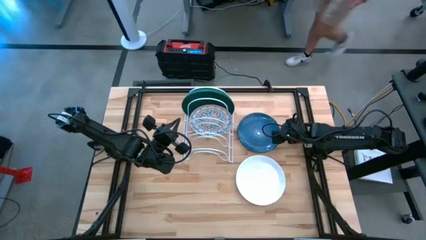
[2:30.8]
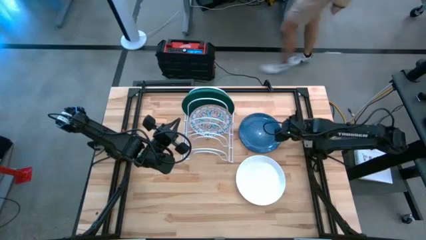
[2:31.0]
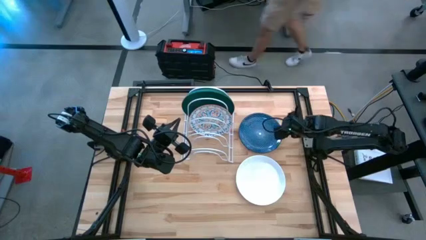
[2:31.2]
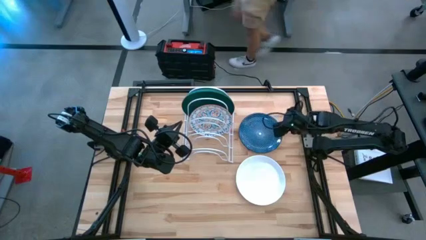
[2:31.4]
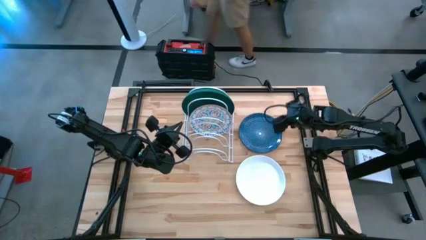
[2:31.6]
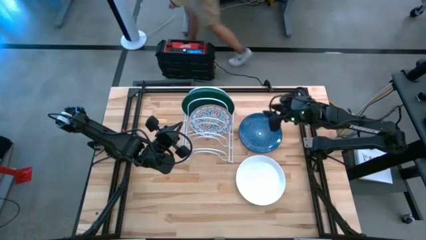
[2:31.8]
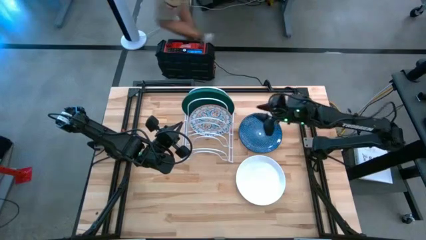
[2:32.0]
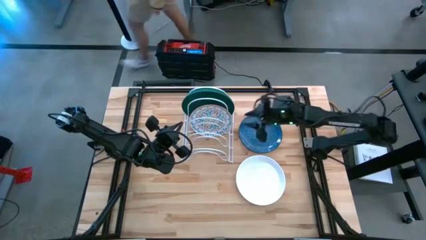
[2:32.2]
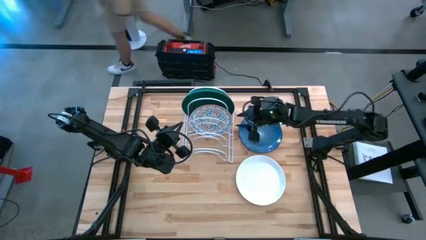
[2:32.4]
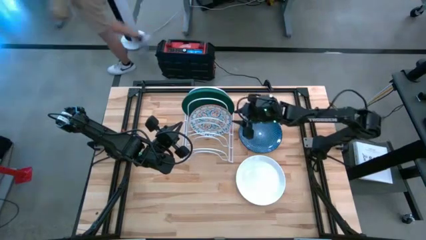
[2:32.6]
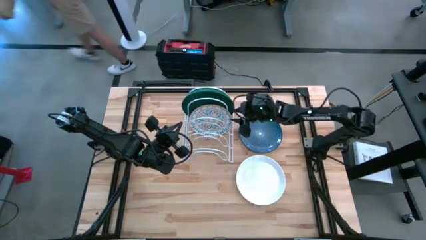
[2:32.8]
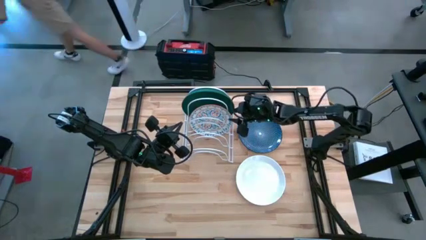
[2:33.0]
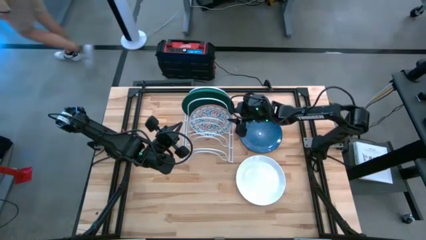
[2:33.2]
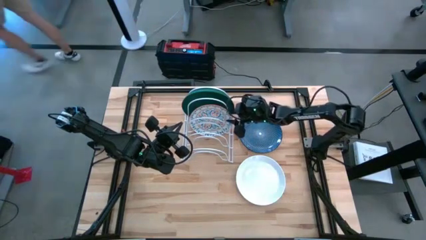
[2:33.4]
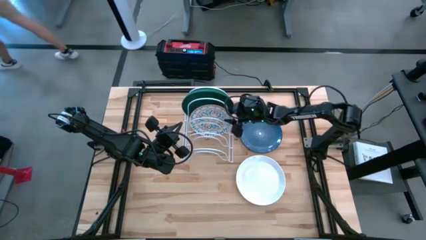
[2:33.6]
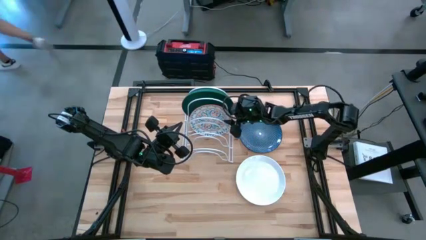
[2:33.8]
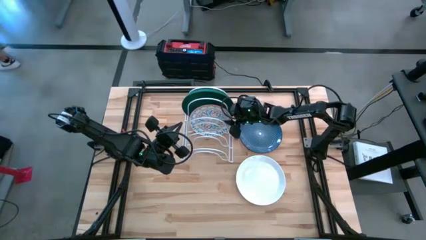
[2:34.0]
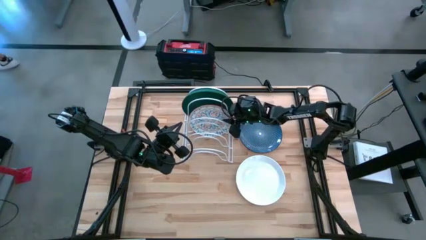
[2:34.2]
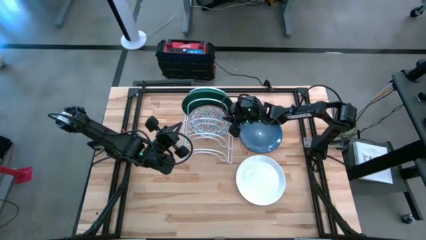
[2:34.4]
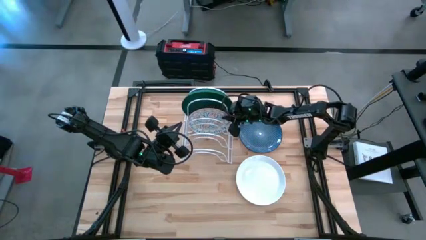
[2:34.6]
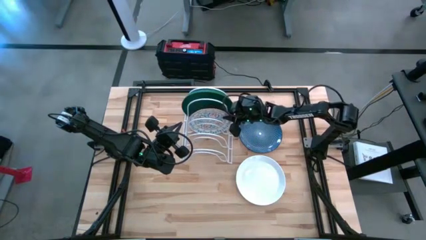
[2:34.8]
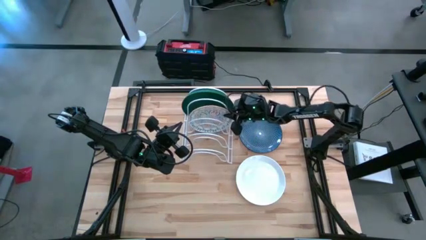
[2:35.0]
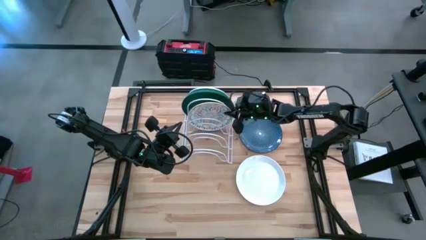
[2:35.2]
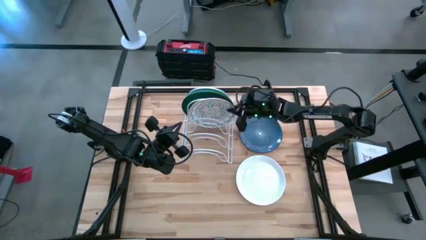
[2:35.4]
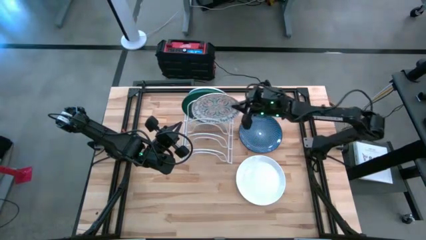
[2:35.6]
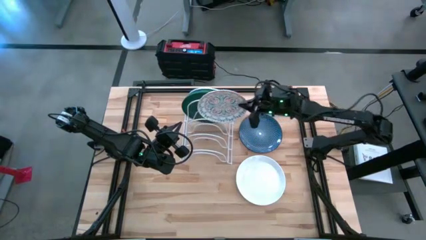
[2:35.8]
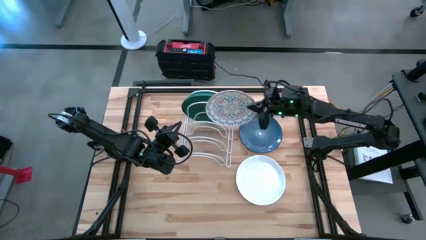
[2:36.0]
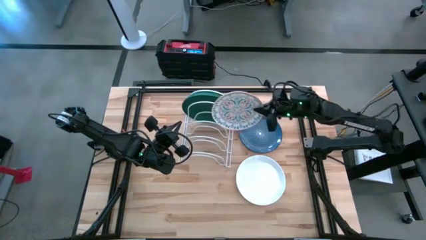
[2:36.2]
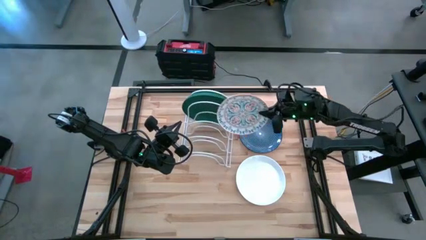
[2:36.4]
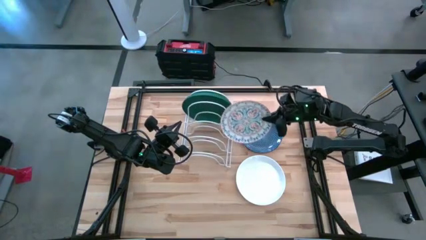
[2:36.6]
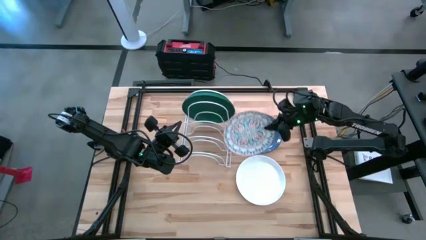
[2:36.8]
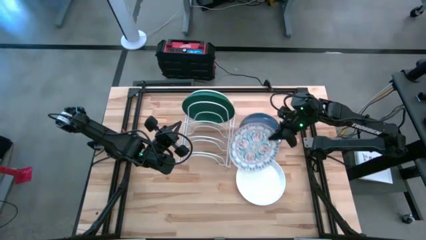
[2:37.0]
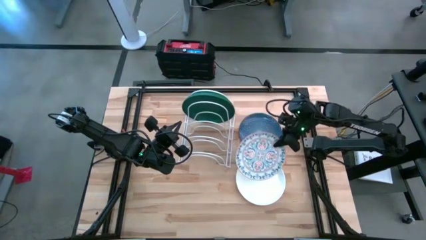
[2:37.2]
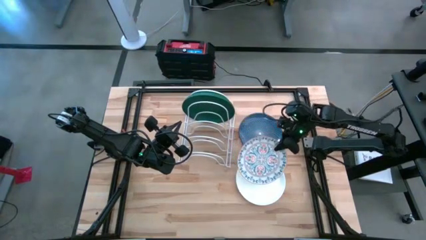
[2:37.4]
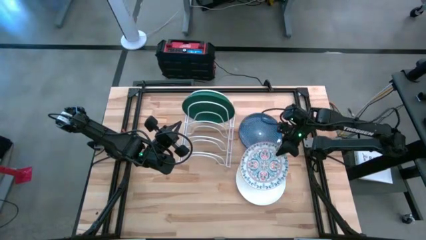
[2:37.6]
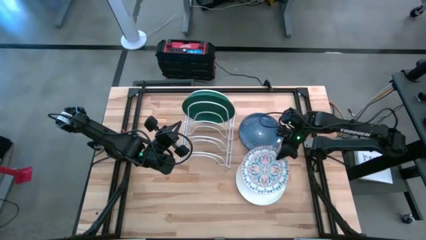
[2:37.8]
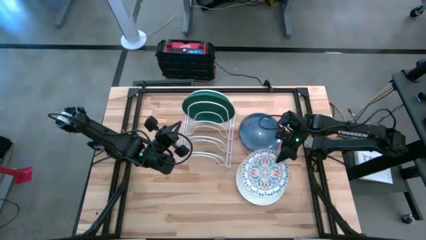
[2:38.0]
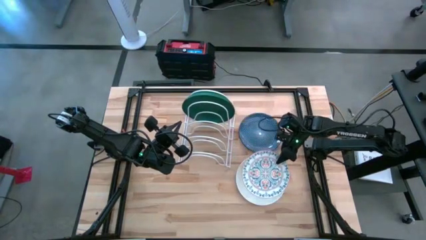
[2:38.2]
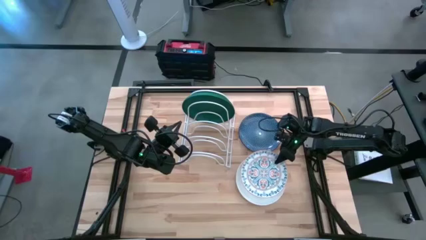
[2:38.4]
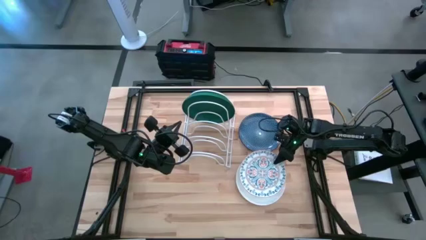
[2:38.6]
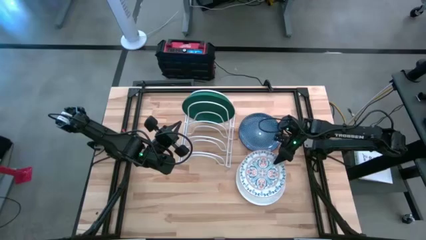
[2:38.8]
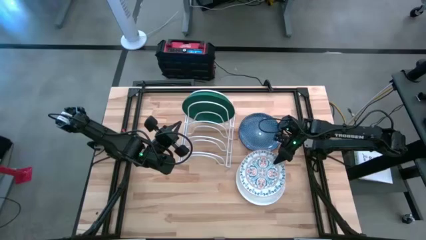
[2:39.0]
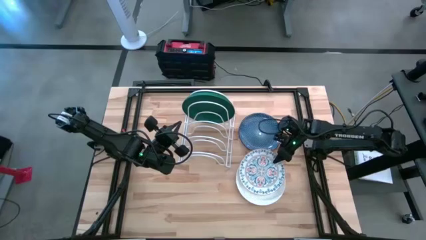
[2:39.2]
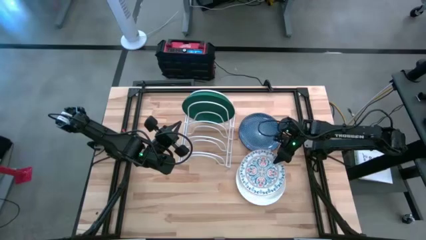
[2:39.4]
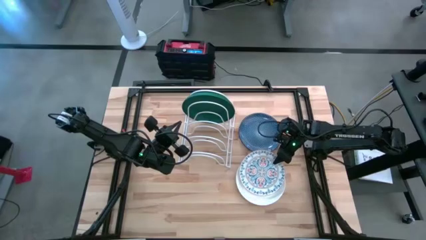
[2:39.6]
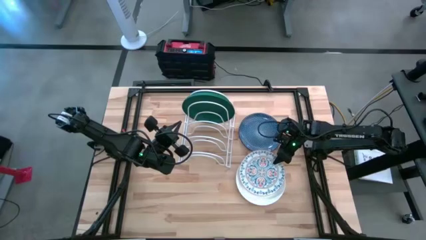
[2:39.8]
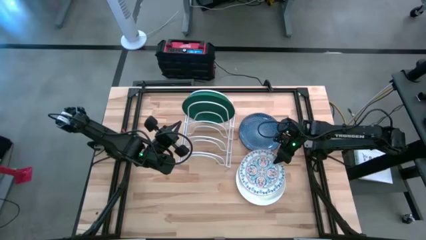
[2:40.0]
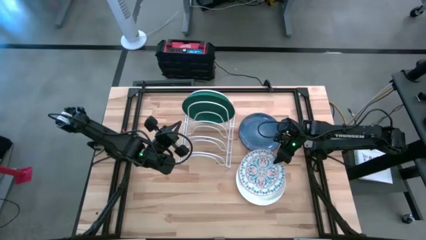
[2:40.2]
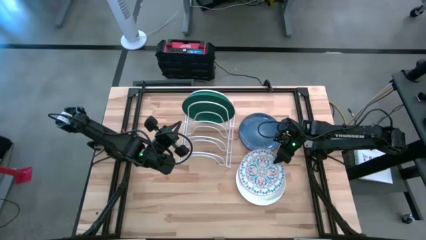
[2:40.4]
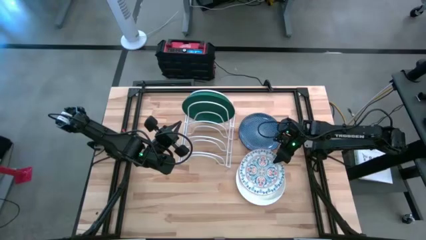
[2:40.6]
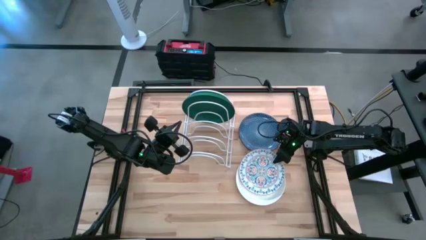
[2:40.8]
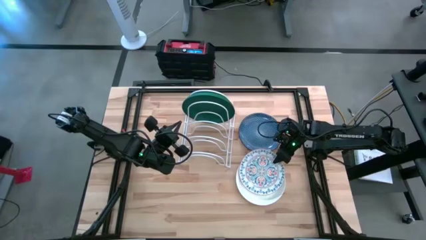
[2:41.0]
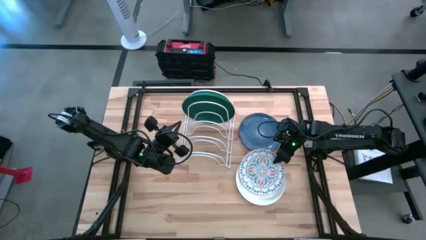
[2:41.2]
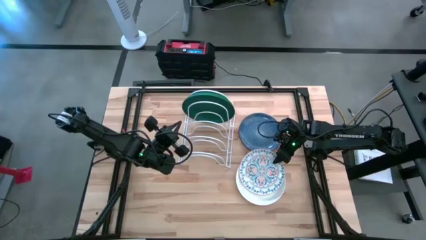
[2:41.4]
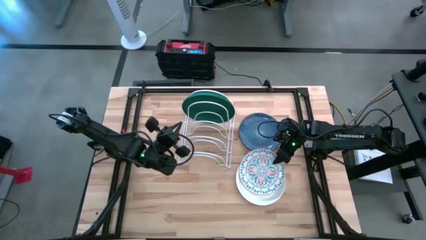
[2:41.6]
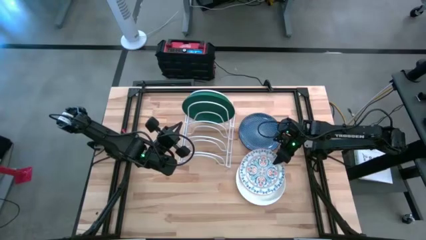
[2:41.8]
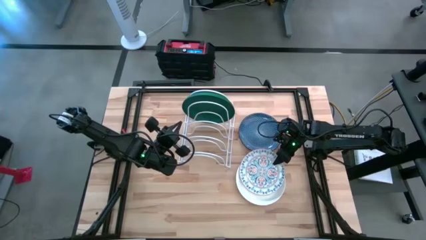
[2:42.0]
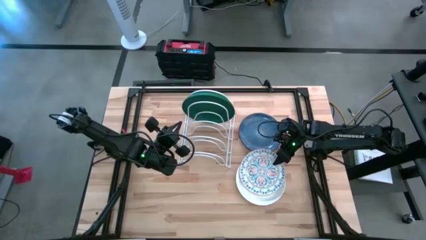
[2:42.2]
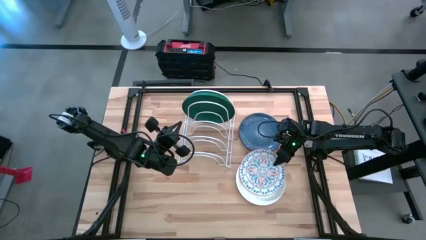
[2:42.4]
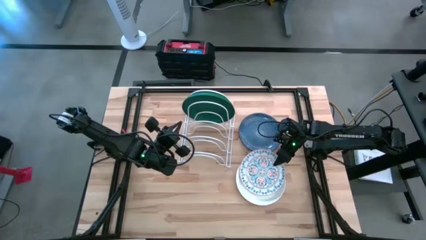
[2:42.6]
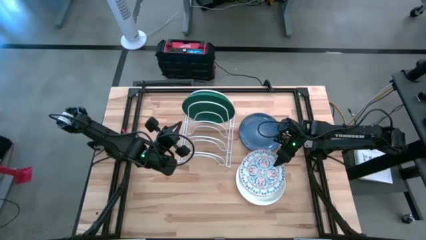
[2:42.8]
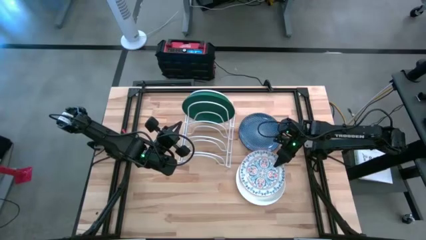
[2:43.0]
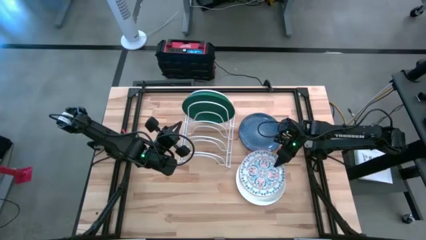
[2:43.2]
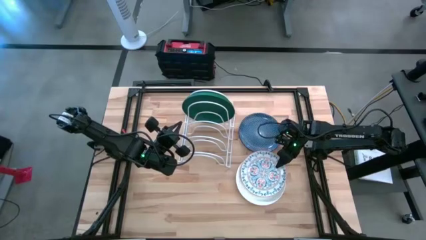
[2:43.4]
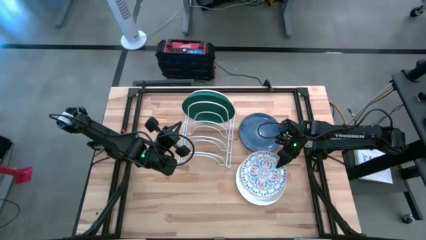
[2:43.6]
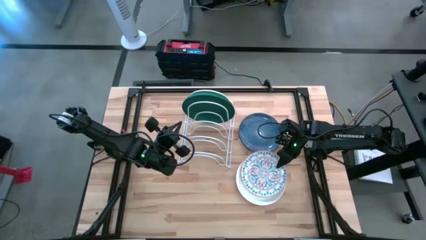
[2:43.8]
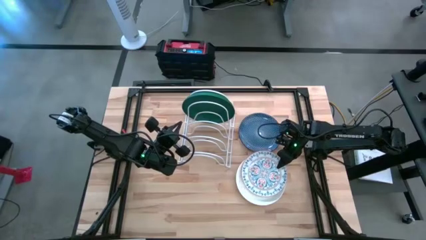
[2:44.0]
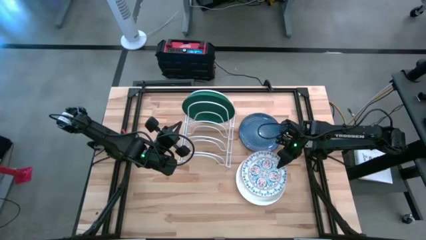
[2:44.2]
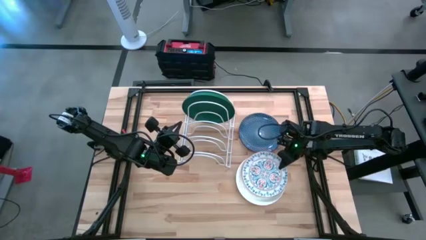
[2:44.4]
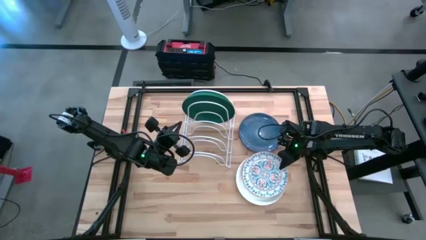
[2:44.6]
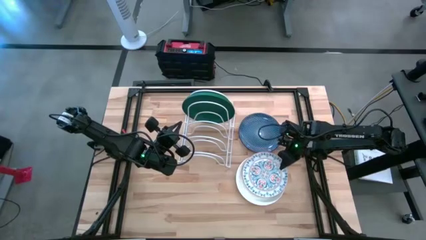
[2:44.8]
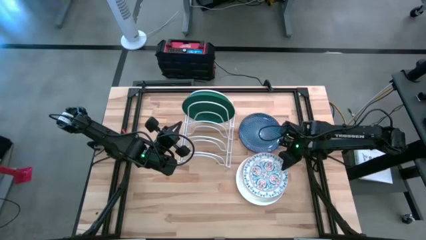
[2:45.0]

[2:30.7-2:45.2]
Task: Sort dishes
Remove the white patterned plate from the dish rack

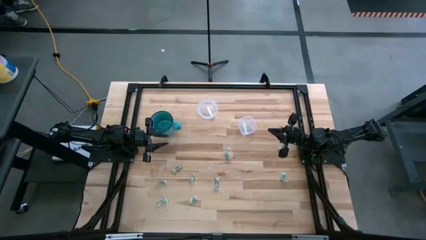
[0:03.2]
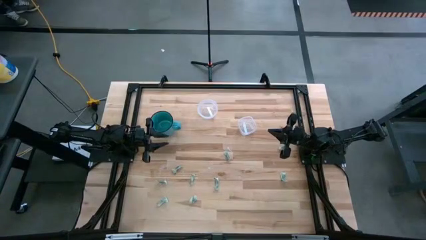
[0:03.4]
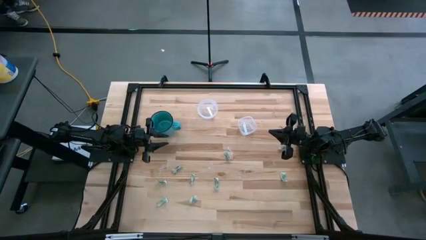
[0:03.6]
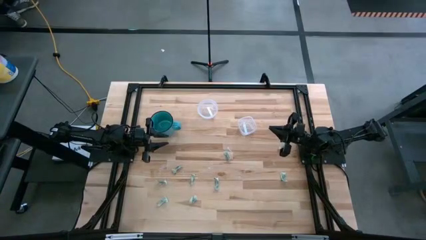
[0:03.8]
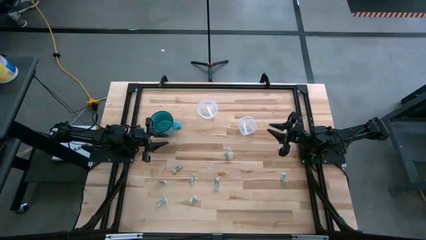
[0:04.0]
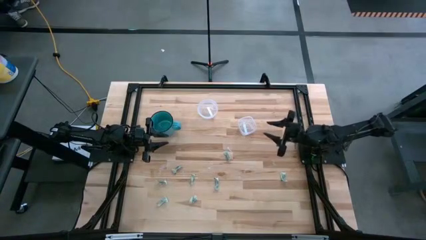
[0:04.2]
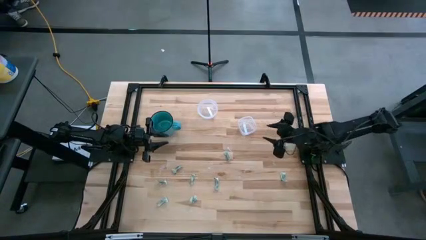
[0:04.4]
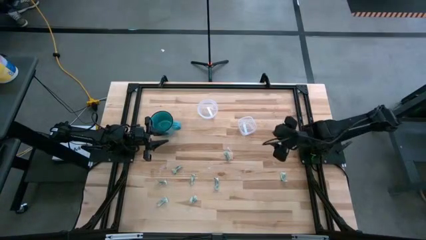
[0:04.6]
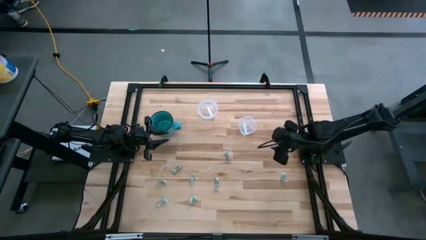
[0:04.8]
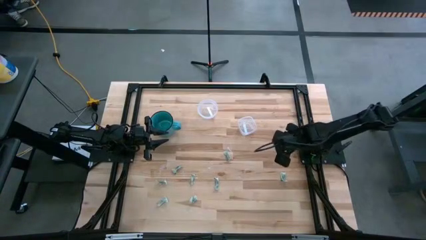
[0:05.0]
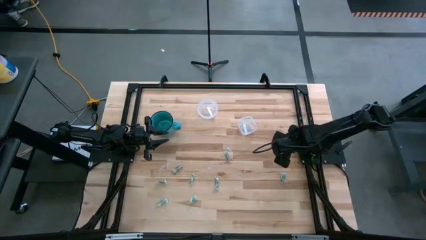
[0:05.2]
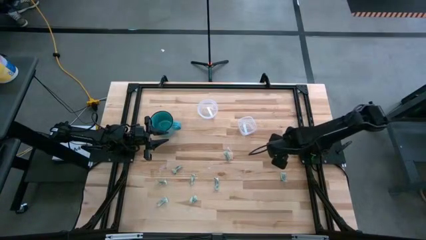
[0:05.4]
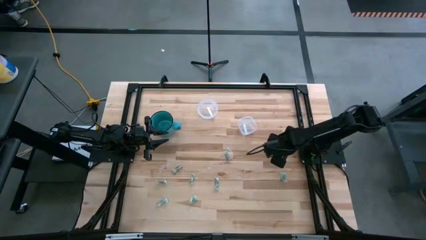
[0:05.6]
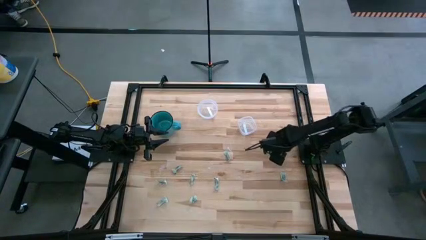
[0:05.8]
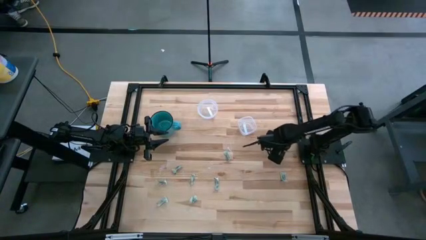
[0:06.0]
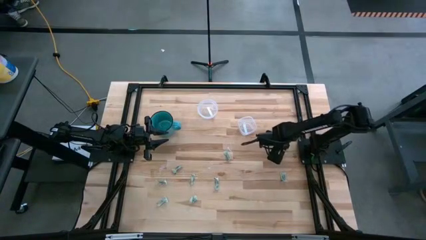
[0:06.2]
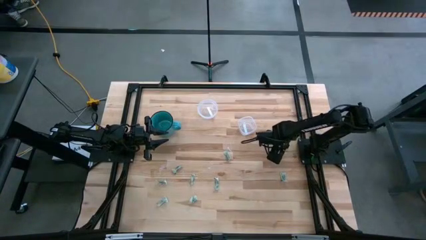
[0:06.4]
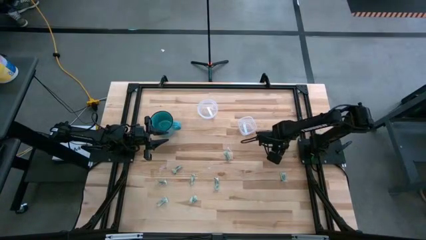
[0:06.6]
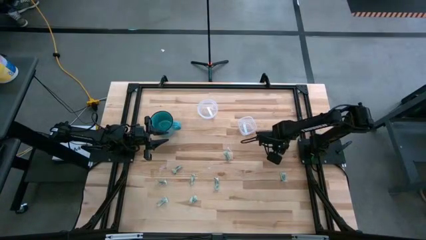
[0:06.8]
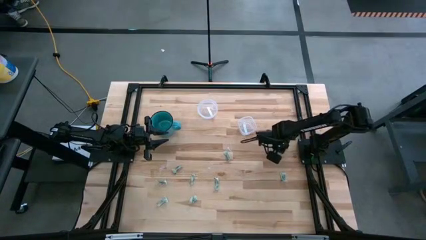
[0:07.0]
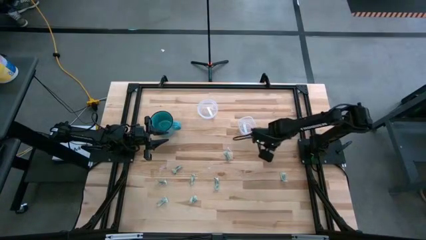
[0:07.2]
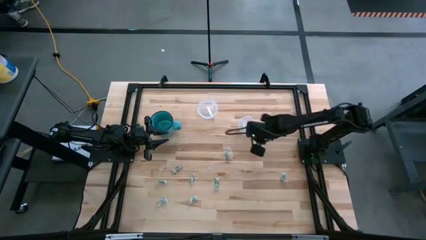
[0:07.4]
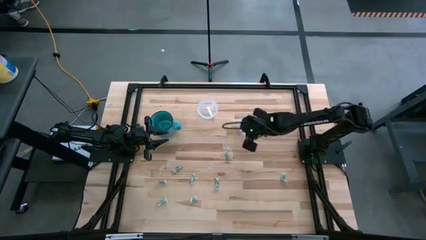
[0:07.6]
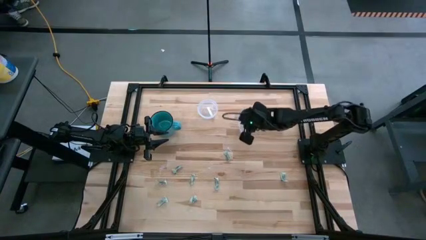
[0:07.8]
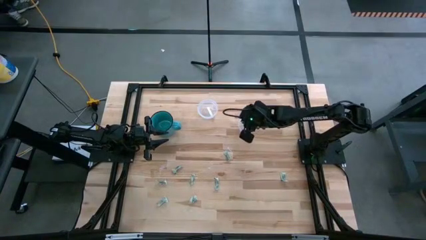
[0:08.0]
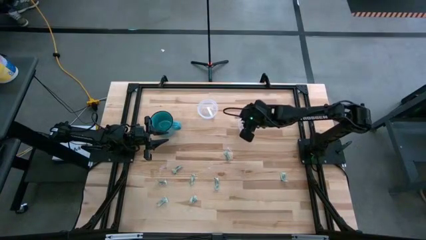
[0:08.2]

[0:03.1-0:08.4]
Task: Pick and place items into bin
Put the stevia packet into the small transparent bin
